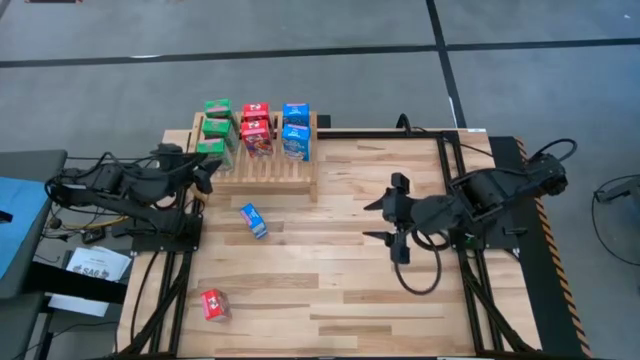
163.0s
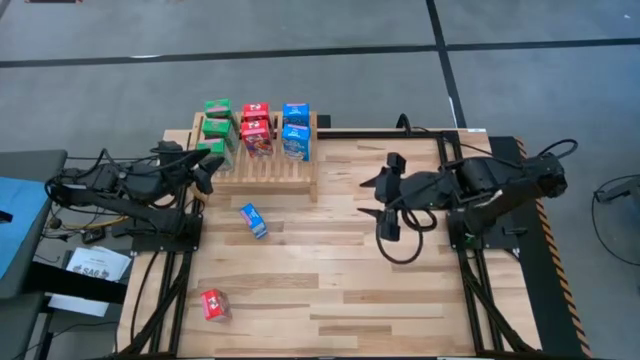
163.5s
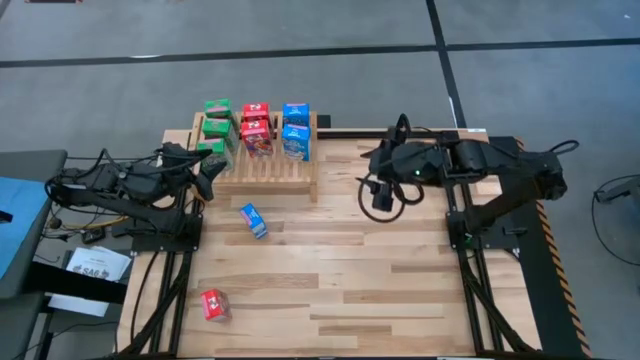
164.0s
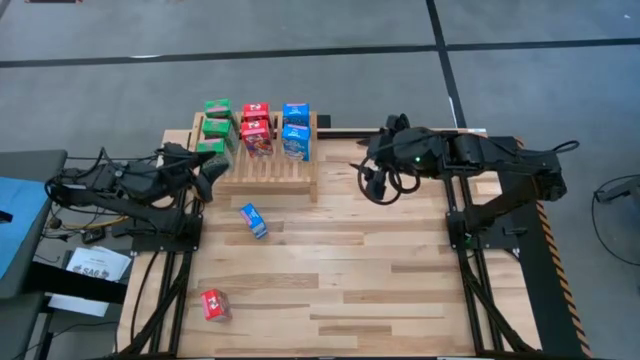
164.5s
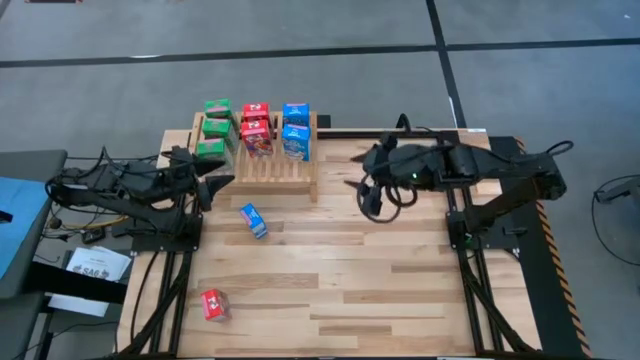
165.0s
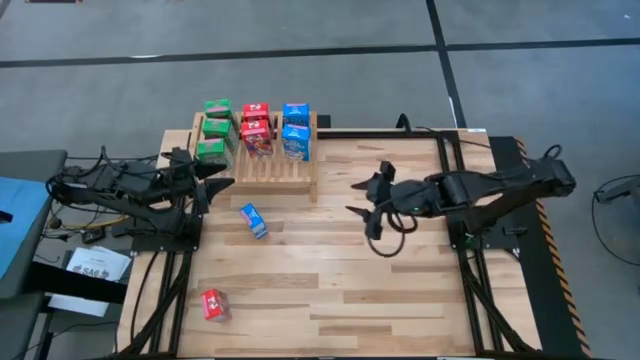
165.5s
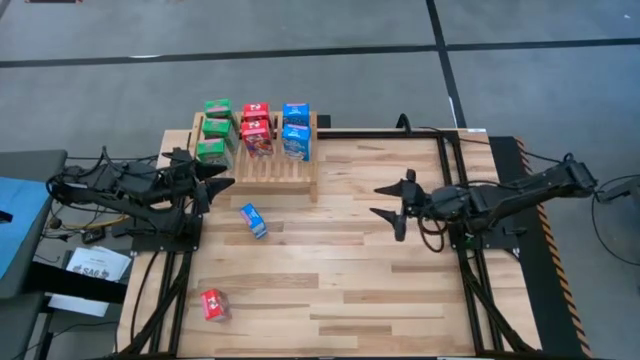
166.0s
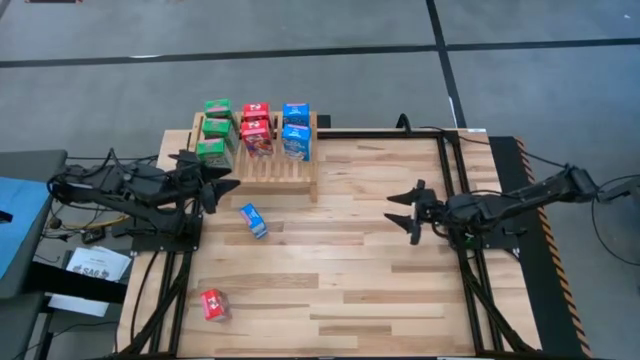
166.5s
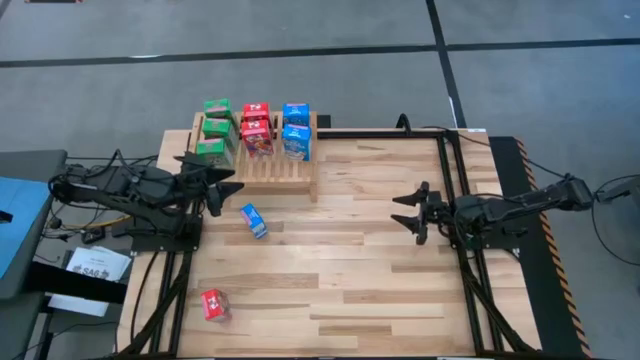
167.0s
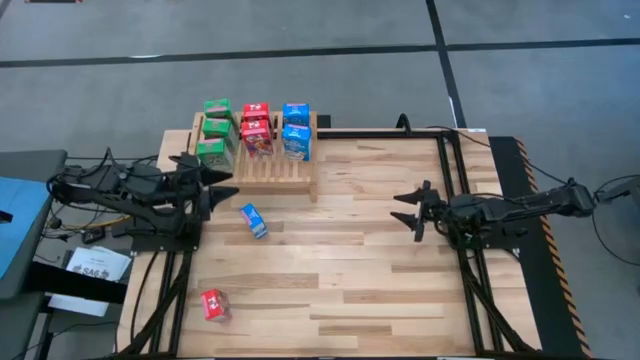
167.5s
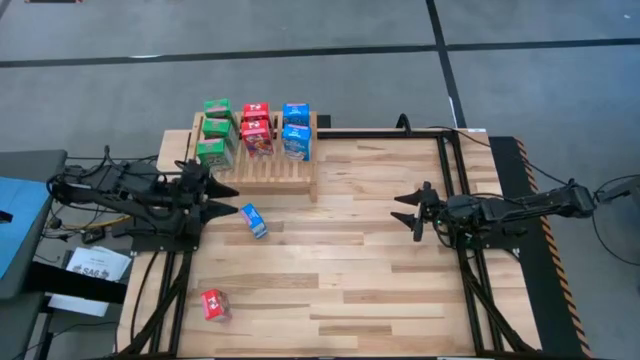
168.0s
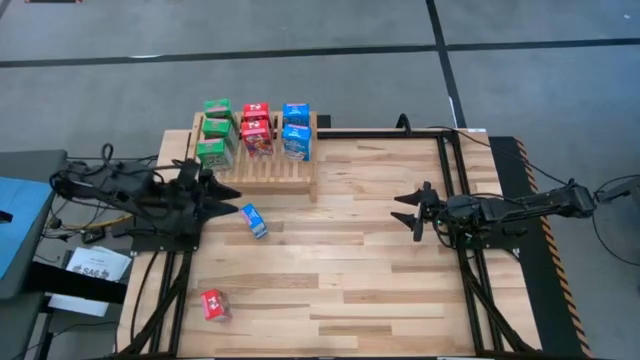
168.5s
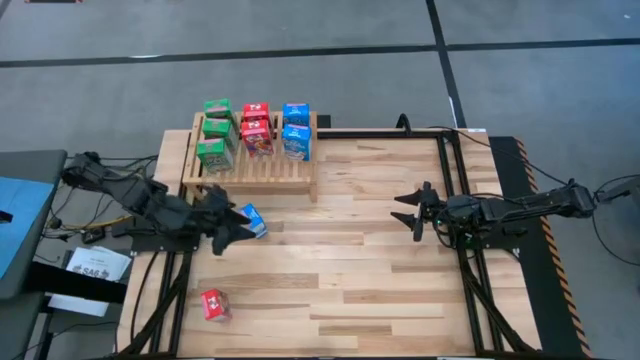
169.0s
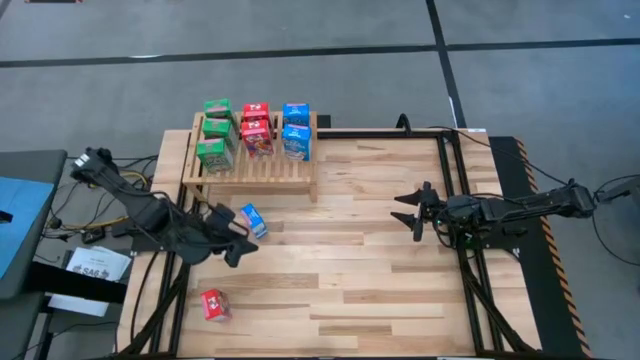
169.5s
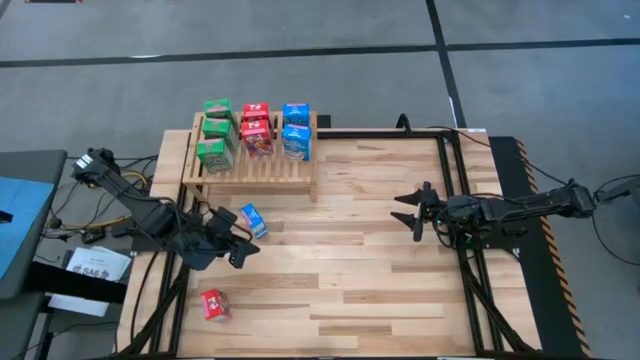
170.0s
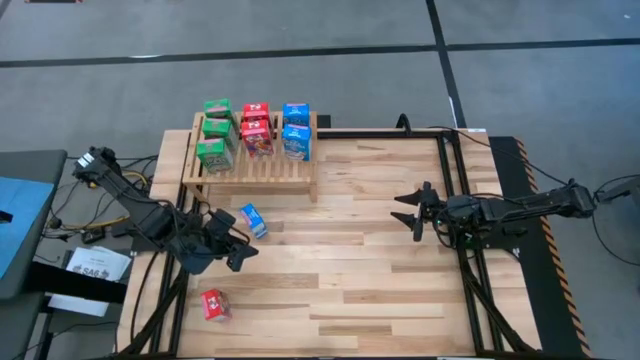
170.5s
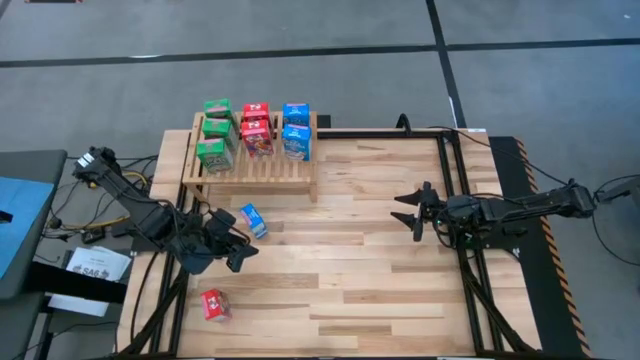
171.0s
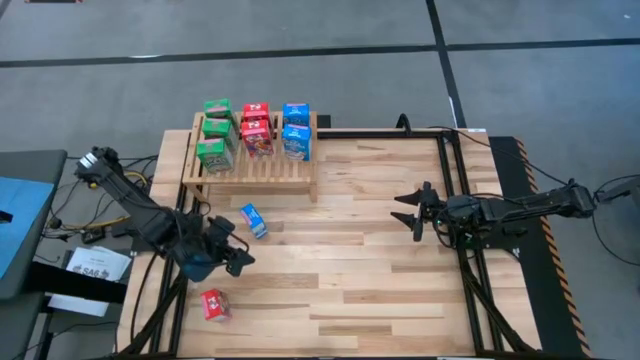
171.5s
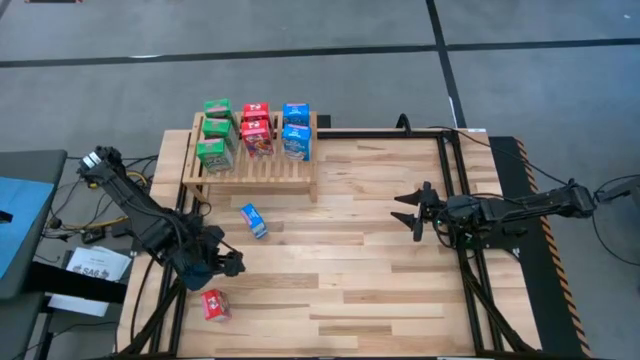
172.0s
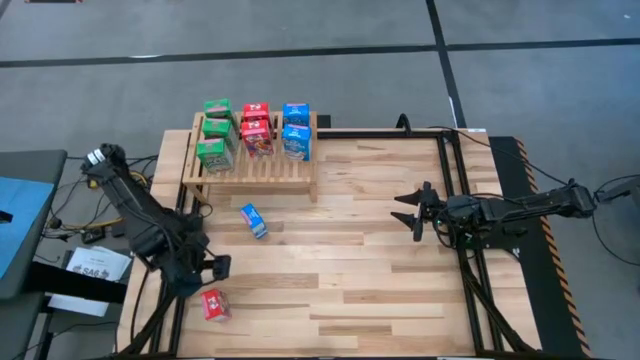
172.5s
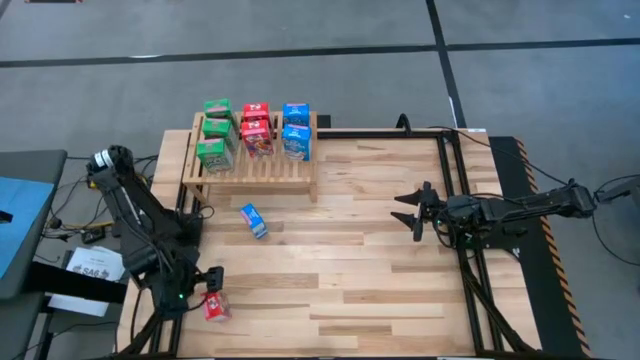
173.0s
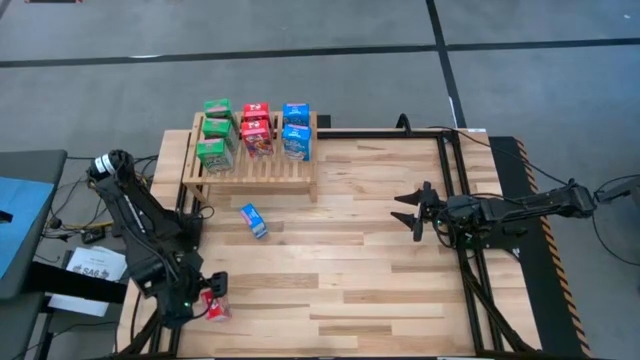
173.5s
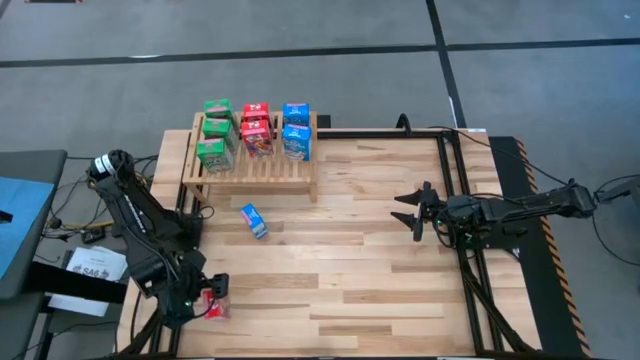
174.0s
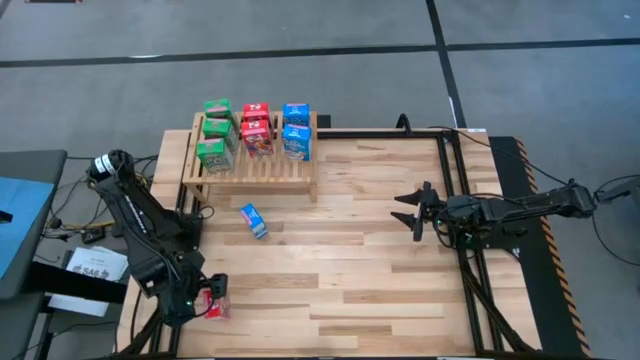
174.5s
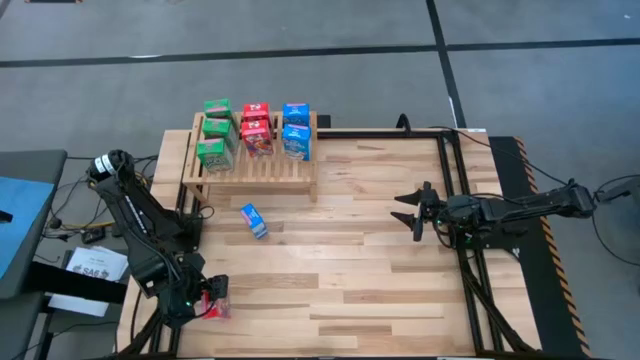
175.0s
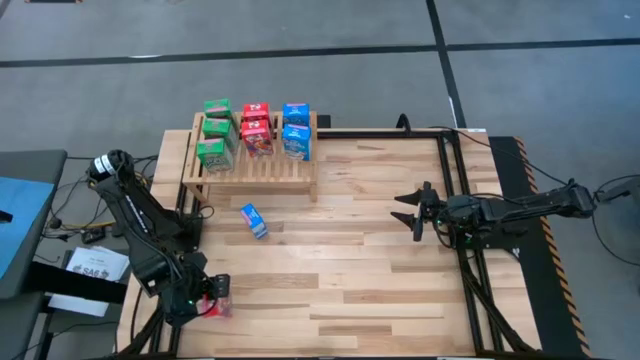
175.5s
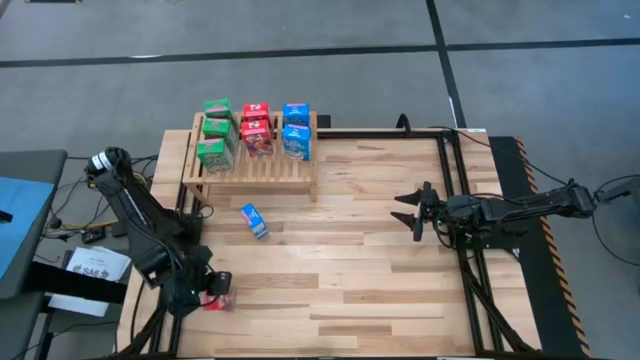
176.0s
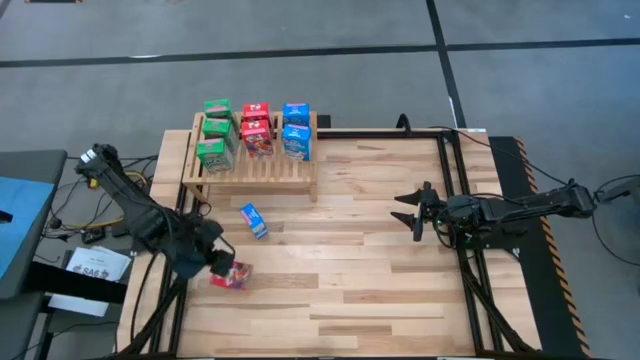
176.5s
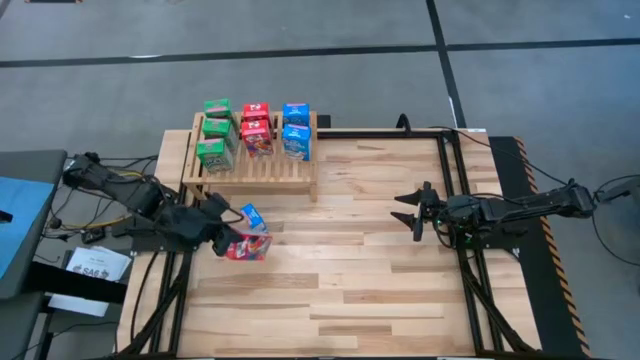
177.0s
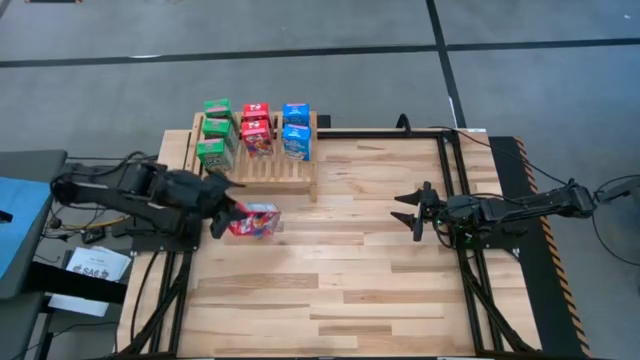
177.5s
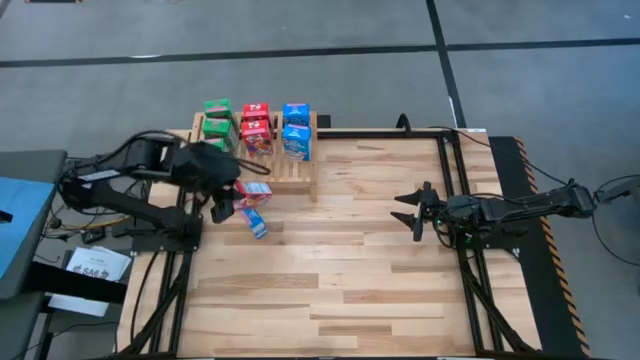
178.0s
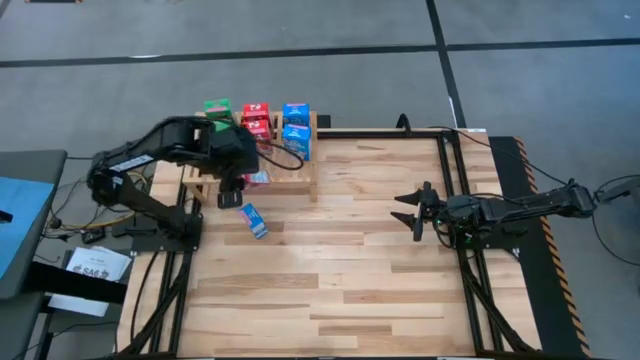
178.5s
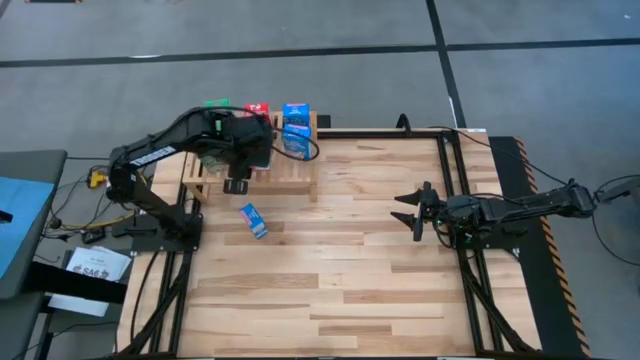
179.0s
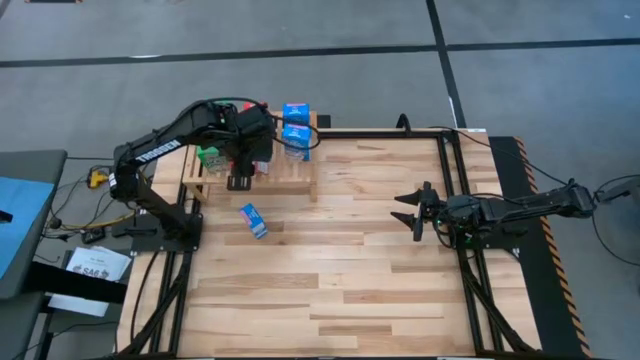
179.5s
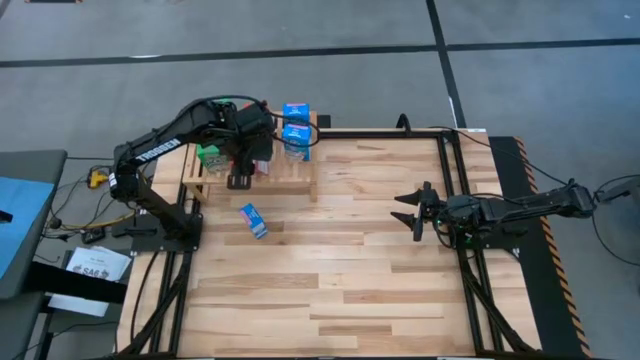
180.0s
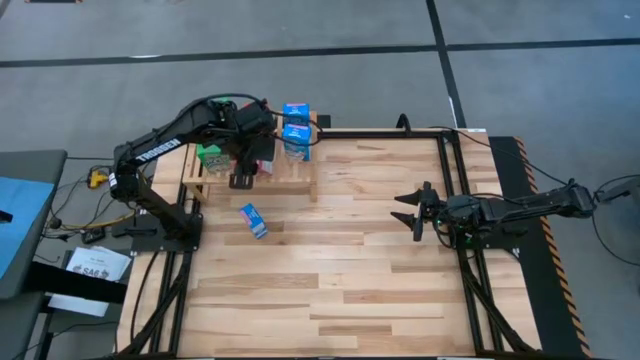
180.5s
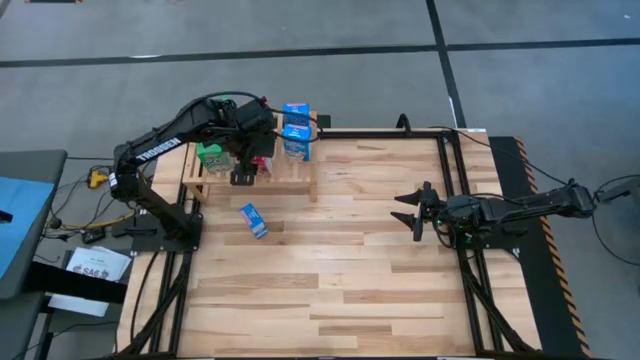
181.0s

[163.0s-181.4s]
Task: Stack cereal on shelf
Put the red cereal box on the shelf aligned with the other red cereal box

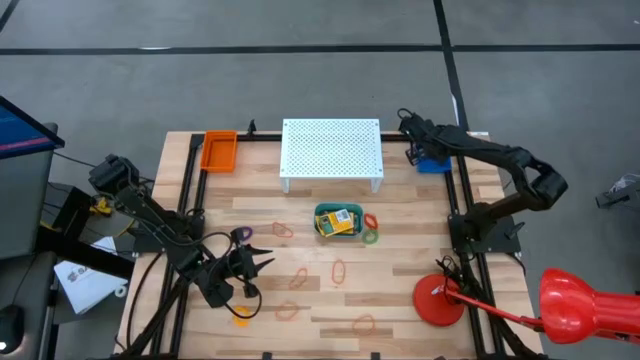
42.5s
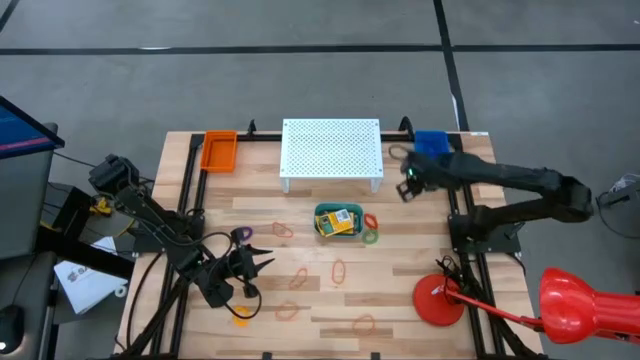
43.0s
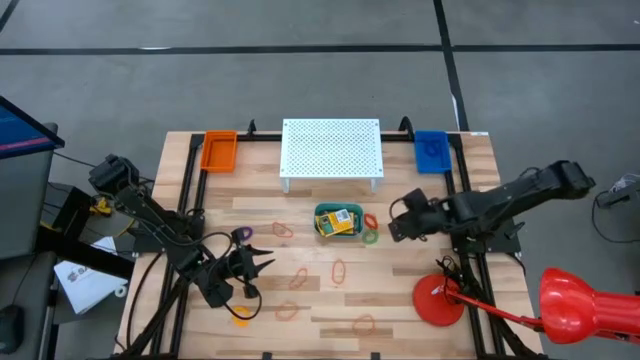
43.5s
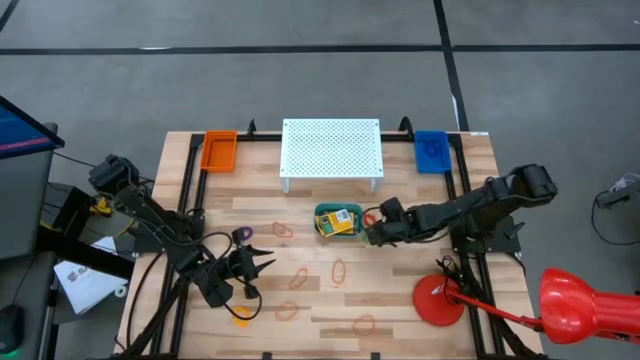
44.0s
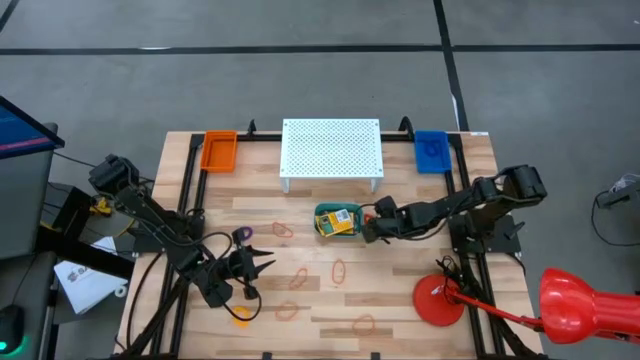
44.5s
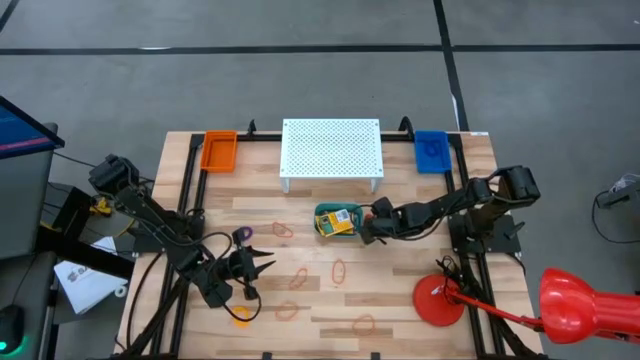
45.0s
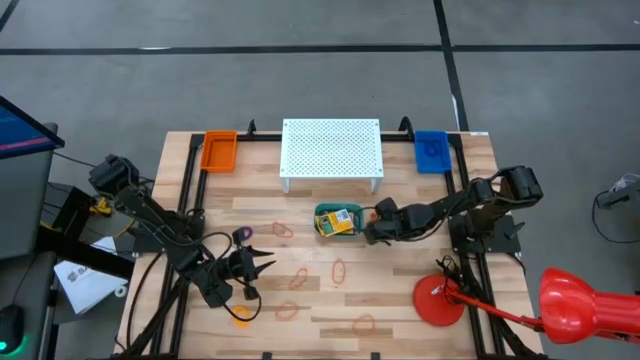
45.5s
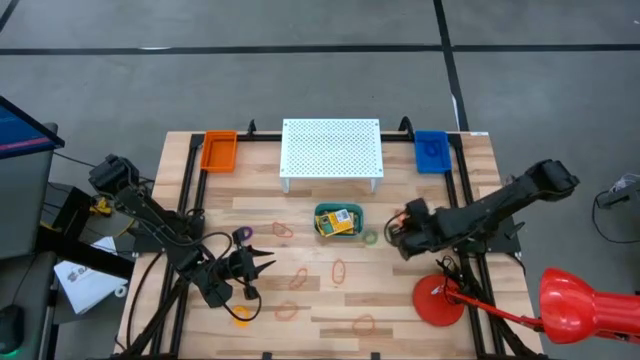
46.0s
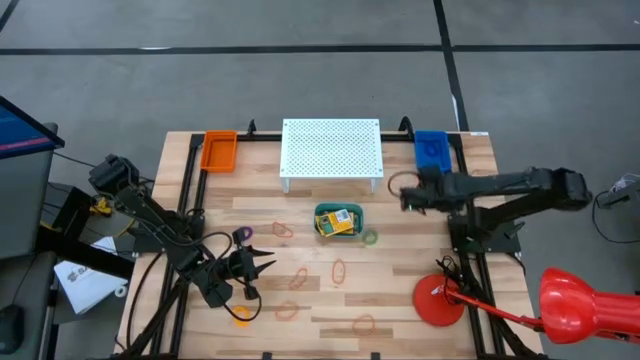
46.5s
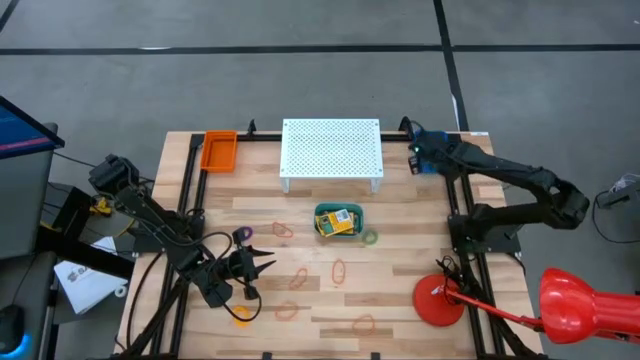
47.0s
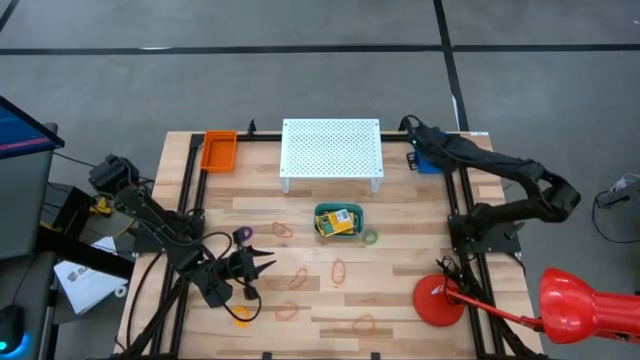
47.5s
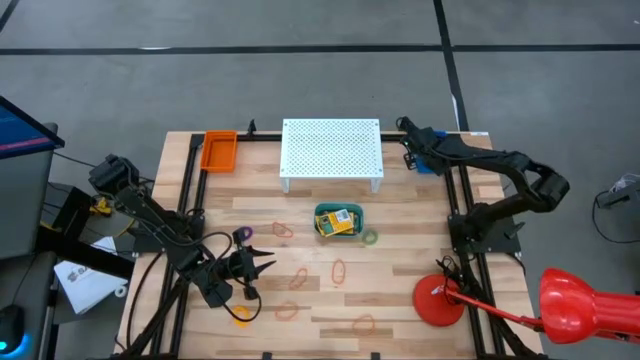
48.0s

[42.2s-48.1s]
Task: Pick & Place Office Desk Supplies
Put the orange keychain into the blue bin
